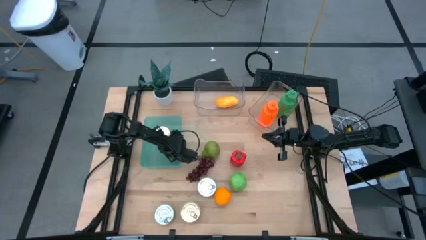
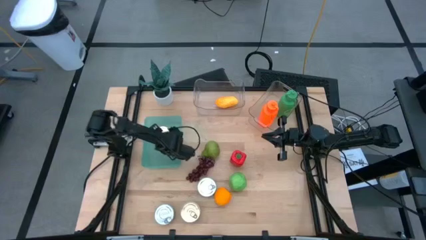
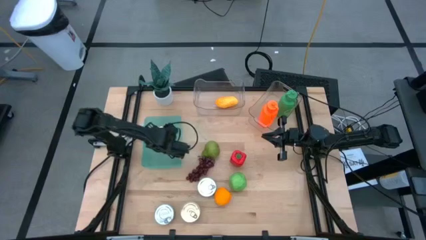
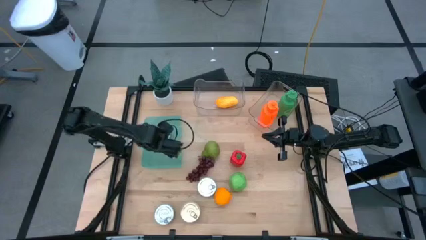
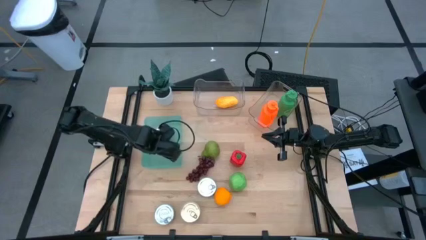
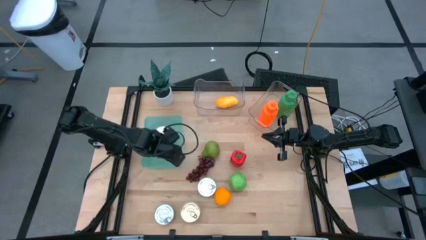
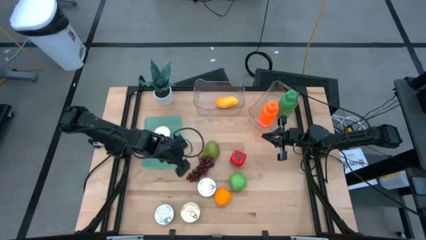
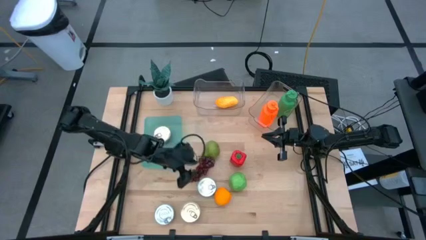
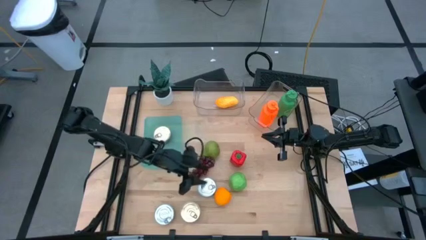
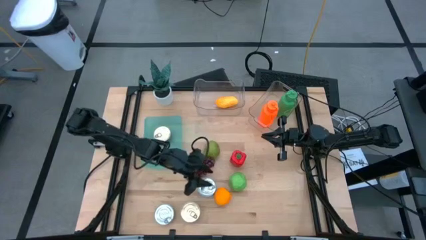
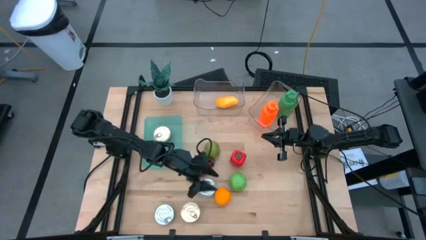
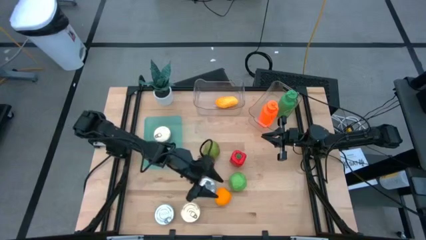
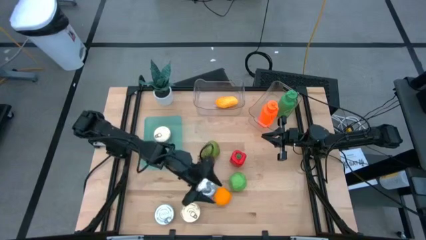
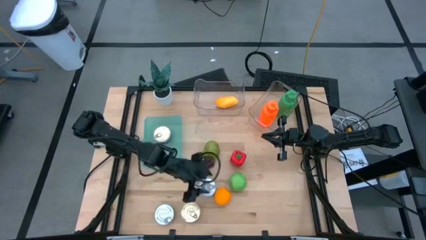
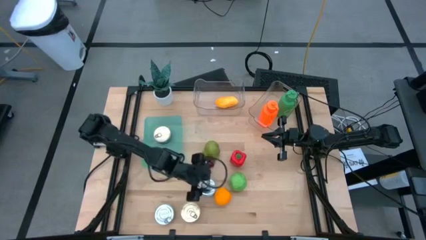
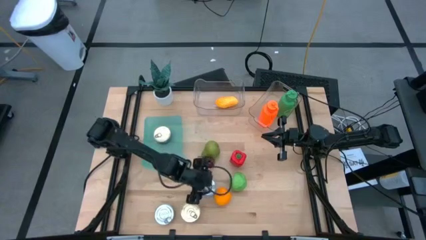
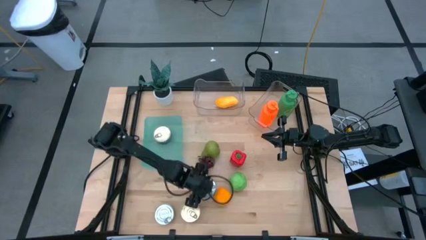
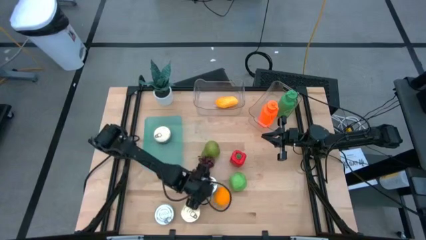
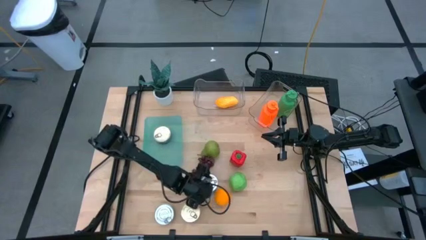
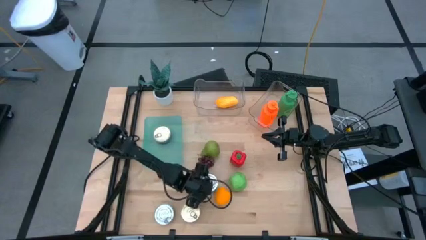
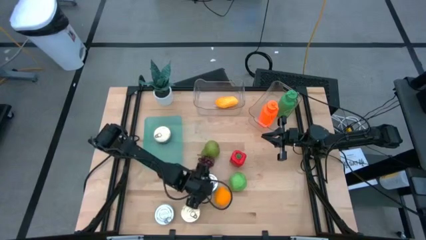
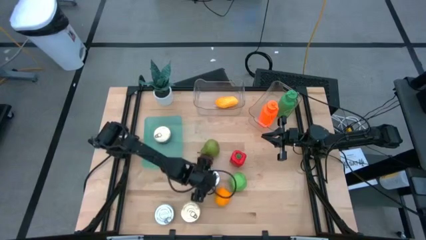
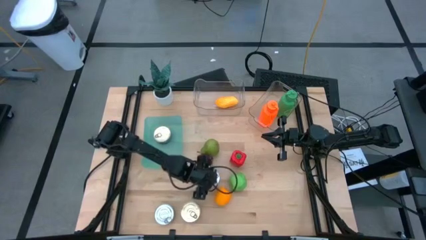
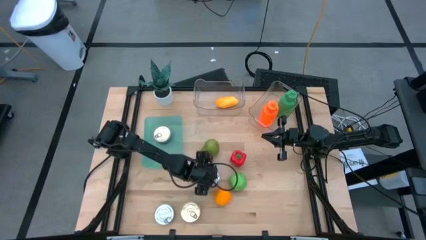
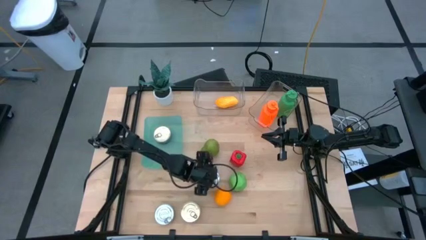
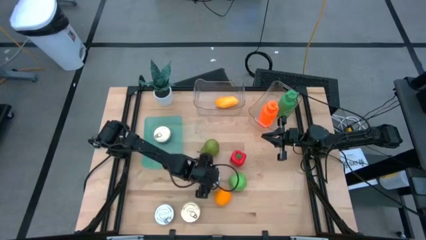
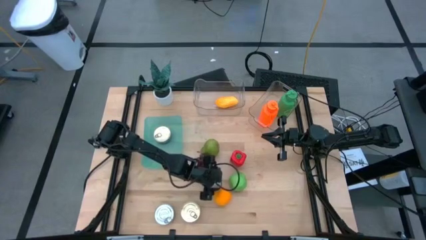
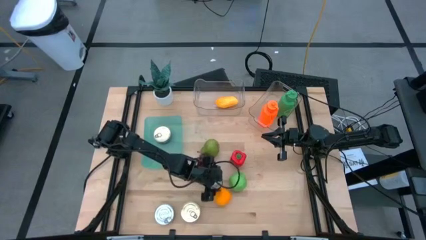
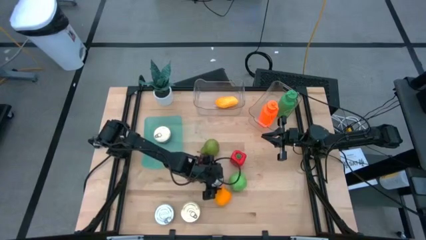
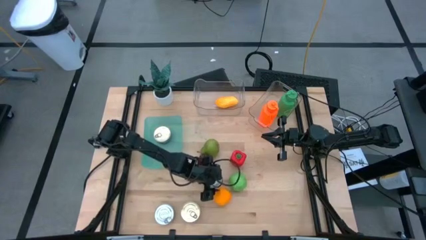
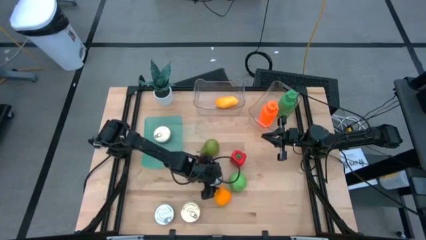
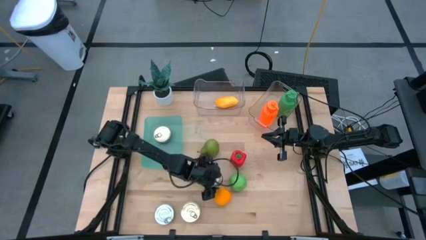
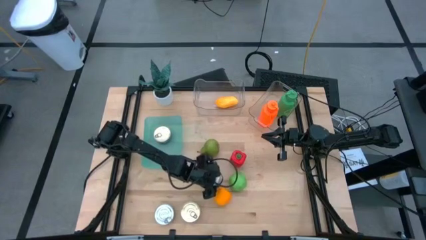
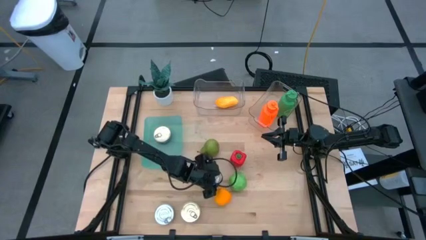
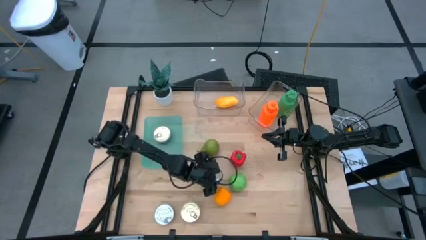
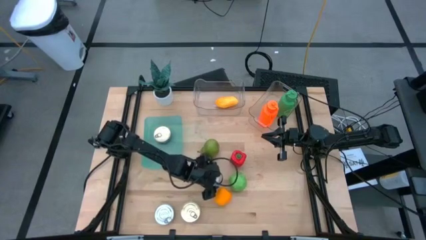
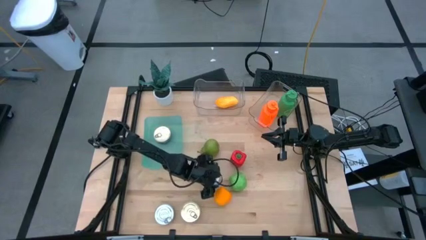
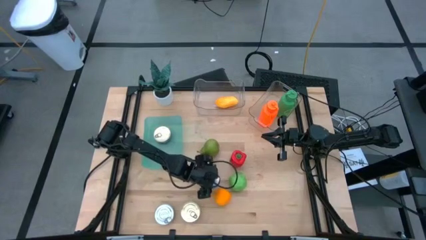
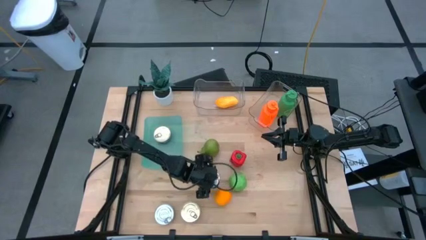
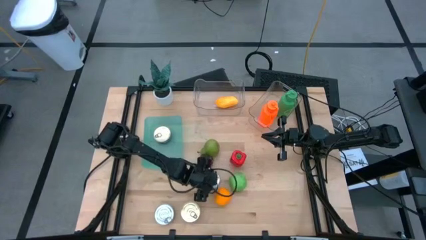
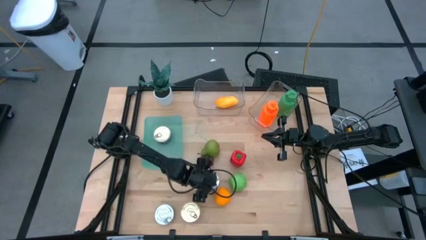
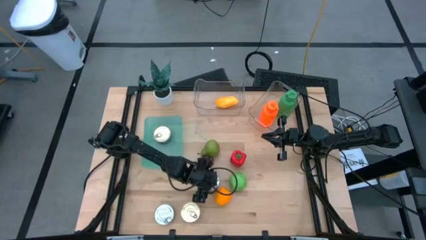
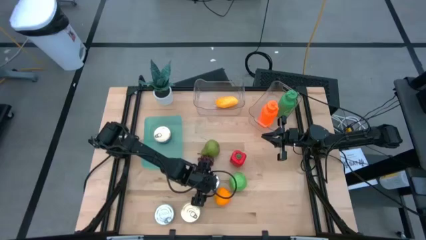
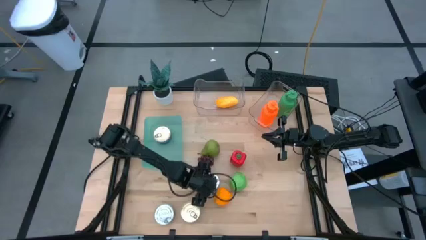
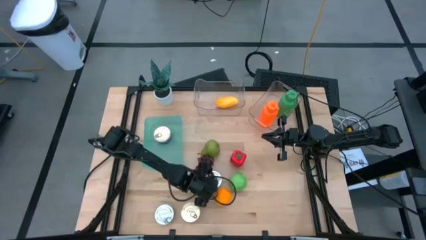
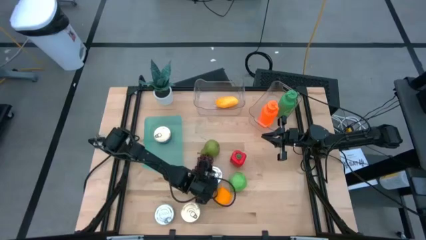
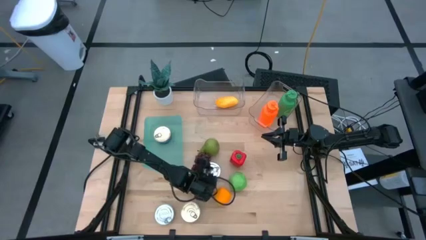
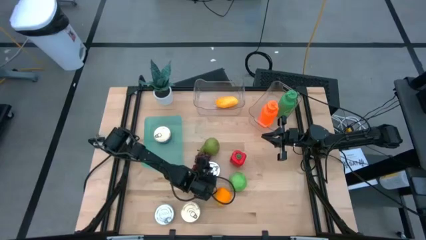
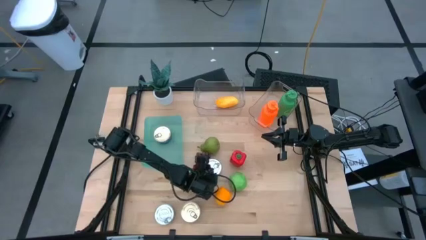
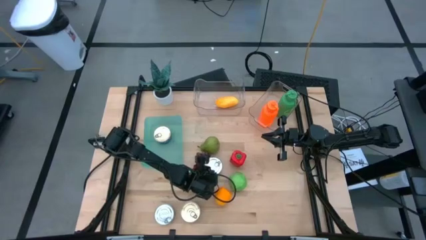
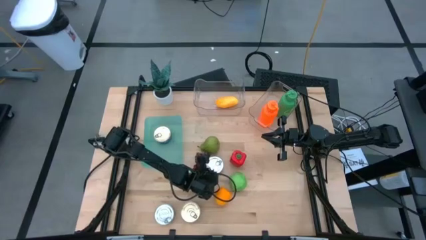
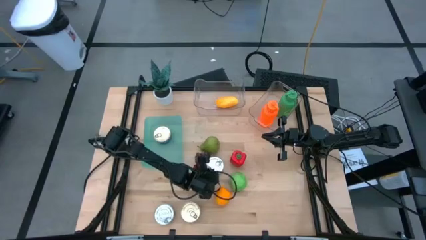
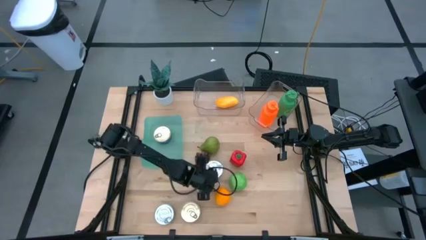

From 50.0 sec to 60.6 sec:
Task: Pick & Place Food Item
Put the green tuna can into the green bin

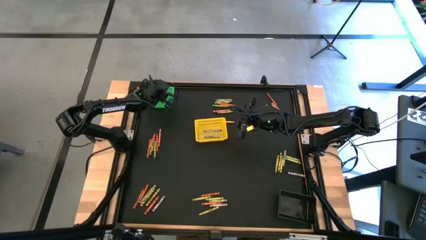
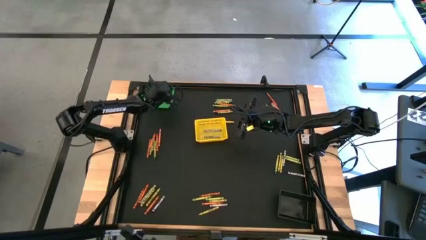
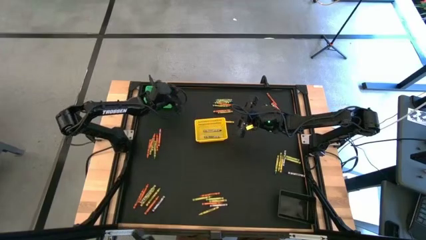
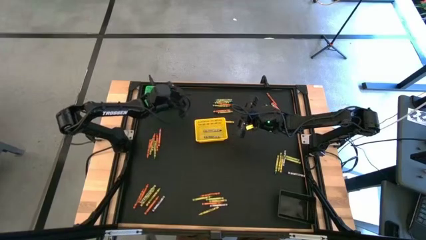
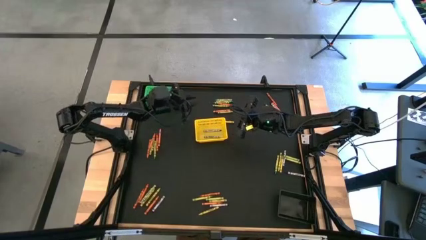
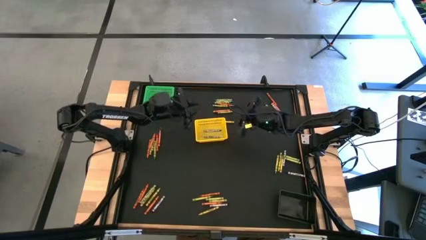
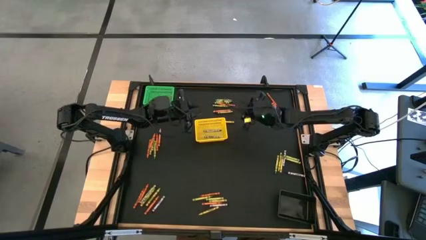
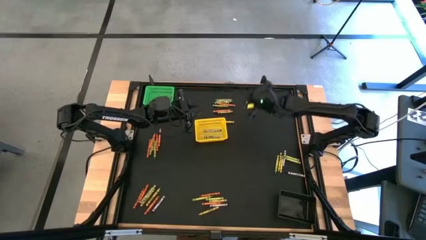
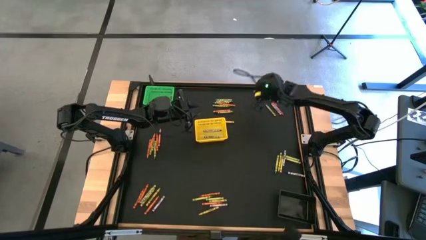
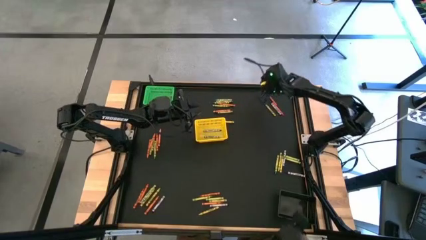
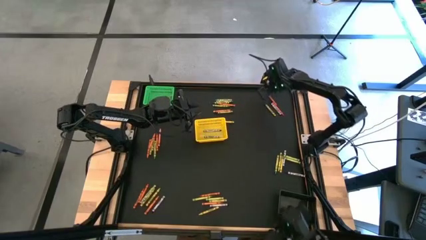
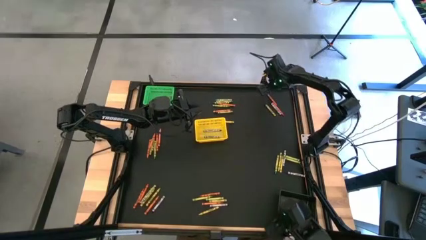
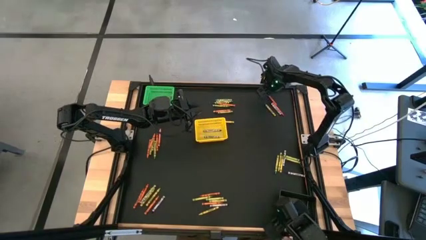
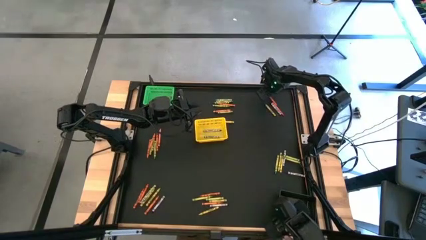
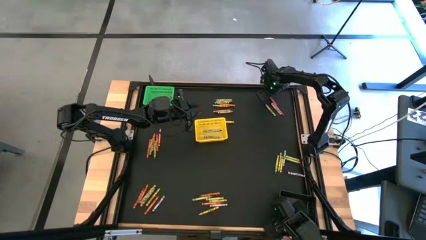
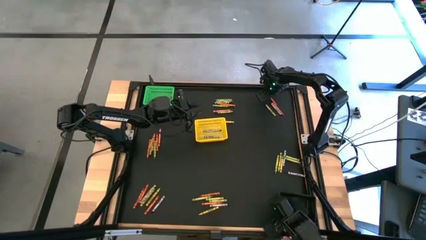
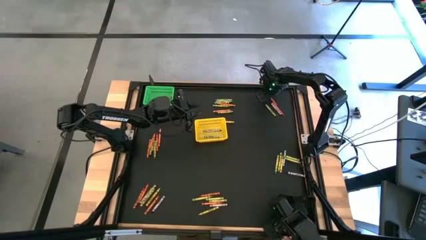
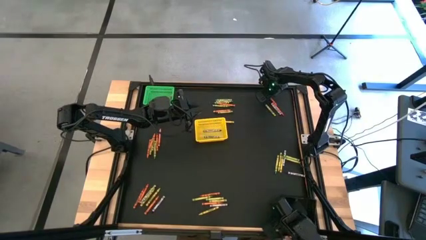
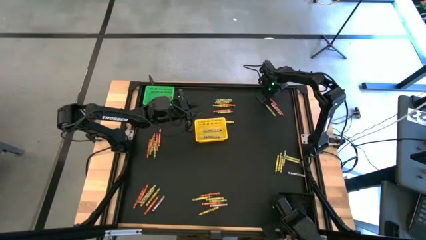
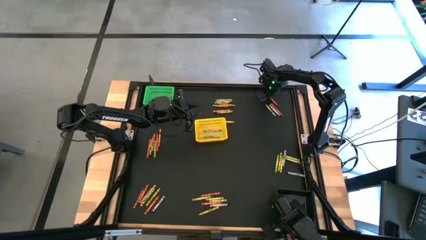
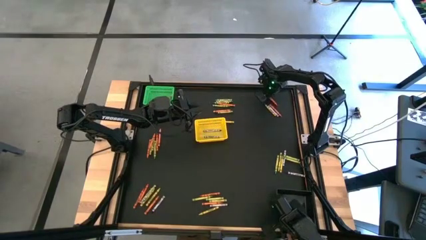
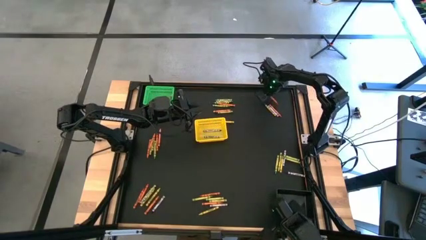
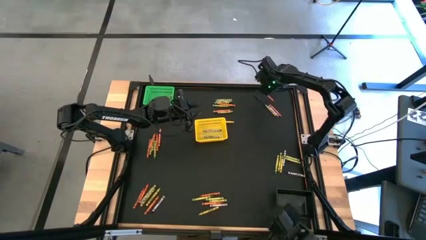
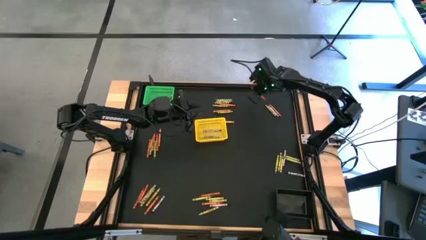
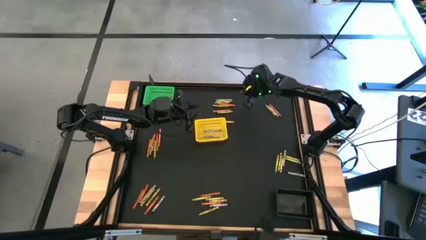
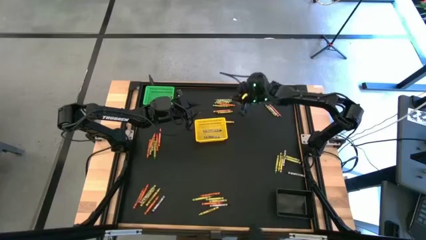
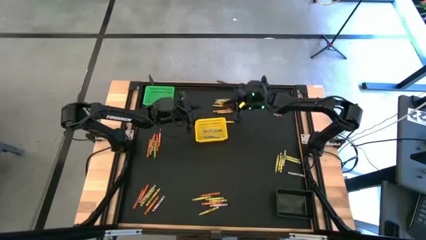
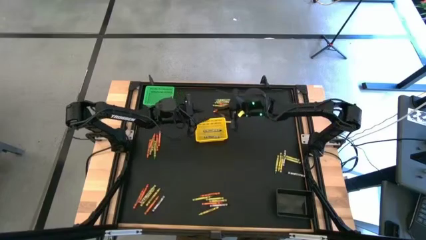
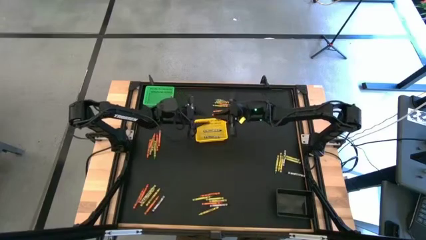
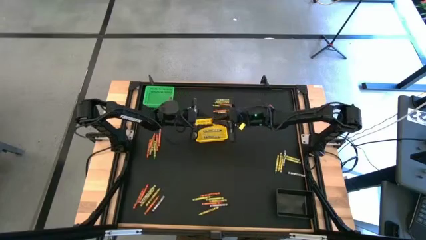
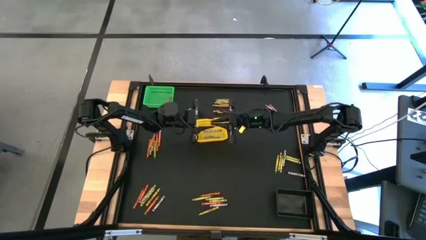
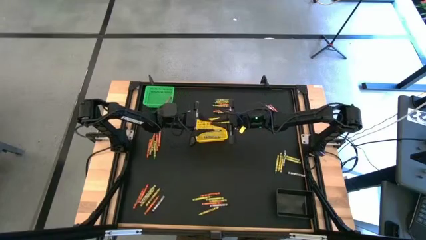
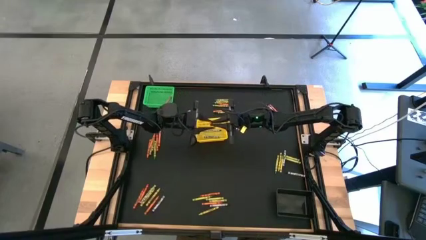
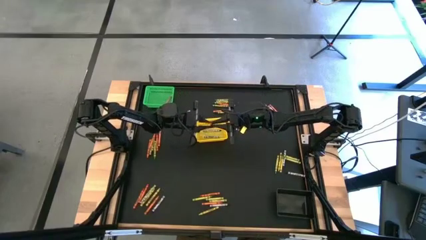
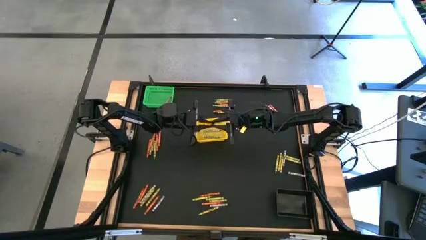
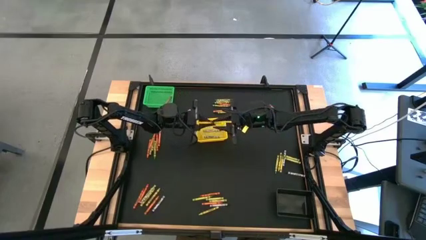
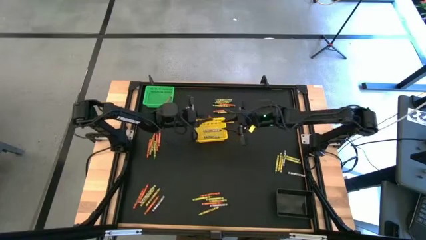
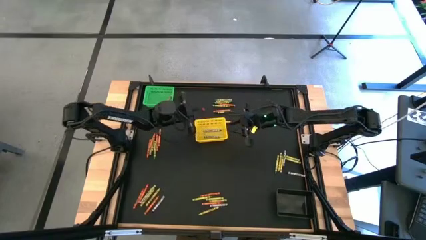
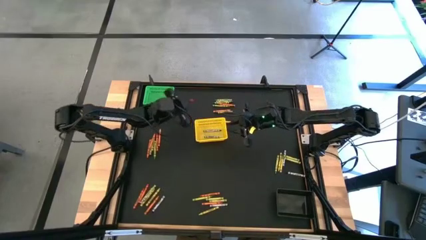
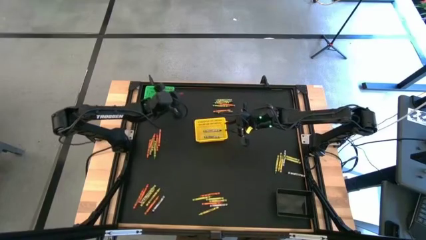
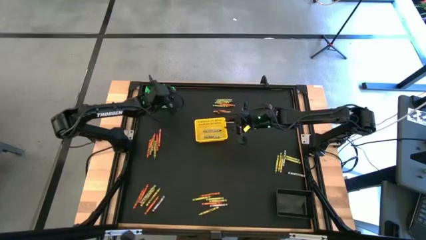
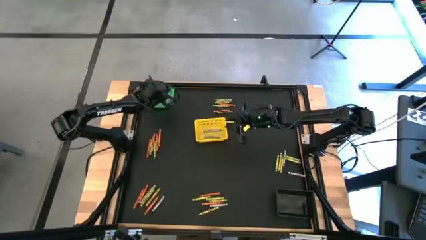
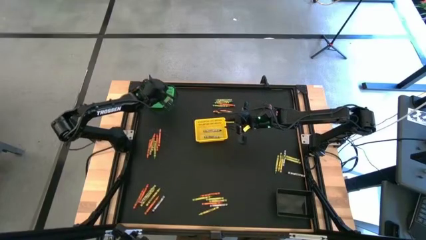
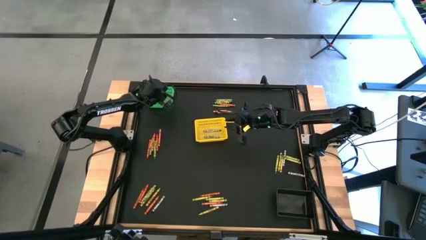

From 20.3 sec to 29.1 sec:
Task: Sort crayons
Put the orange crayon into the green bin
